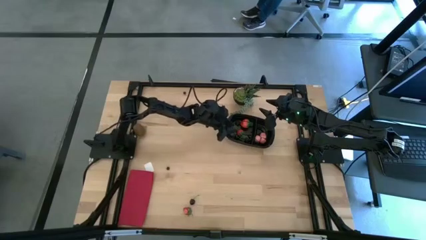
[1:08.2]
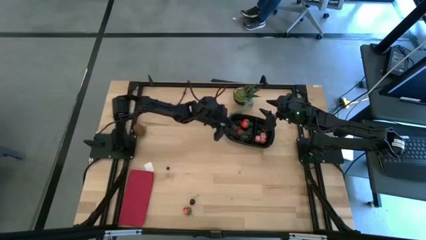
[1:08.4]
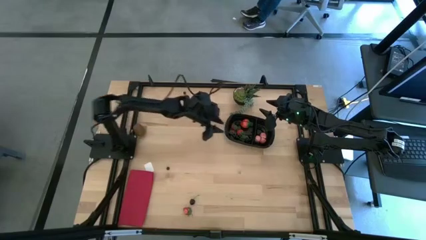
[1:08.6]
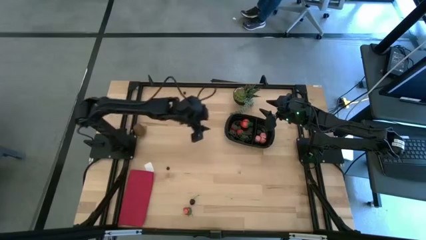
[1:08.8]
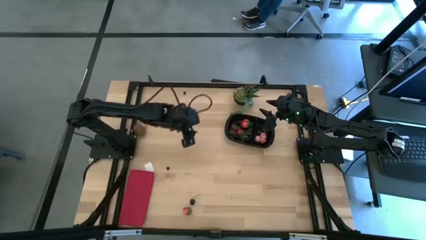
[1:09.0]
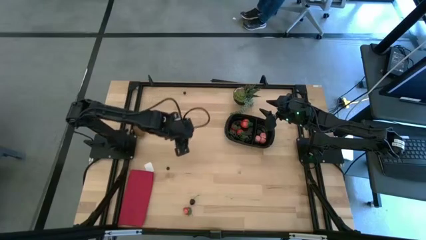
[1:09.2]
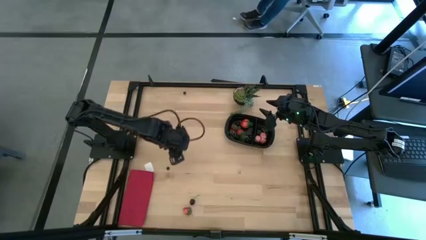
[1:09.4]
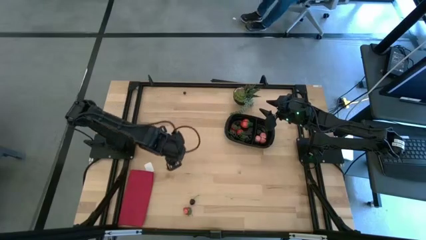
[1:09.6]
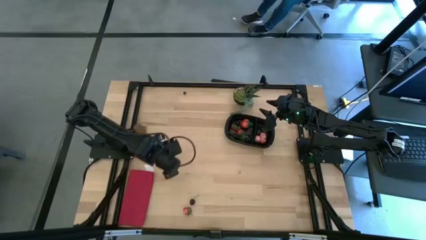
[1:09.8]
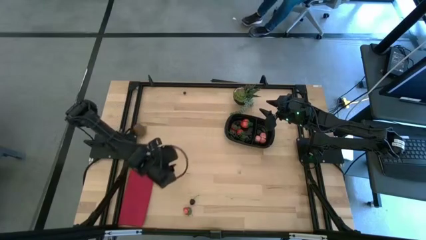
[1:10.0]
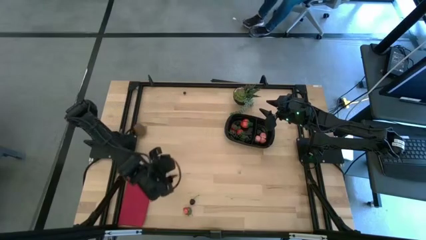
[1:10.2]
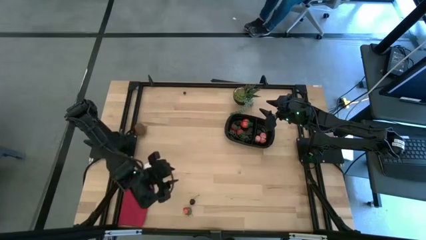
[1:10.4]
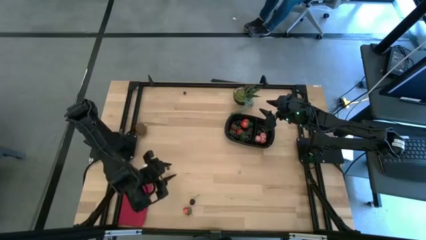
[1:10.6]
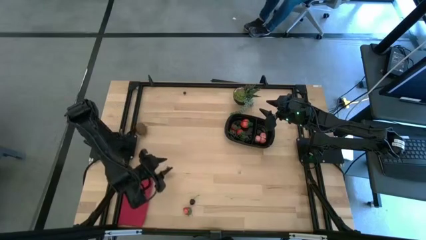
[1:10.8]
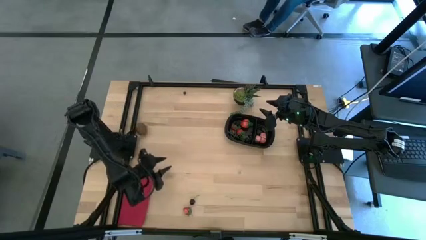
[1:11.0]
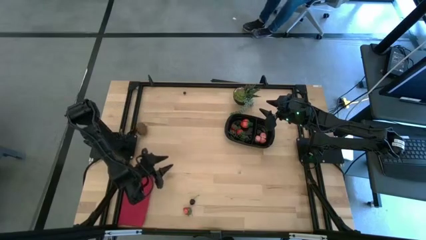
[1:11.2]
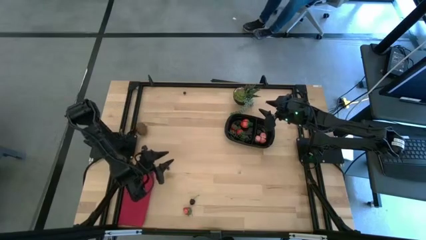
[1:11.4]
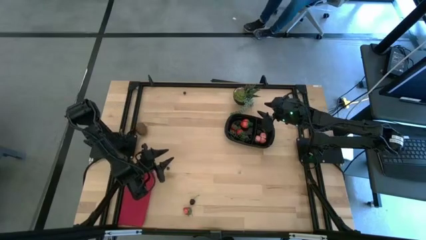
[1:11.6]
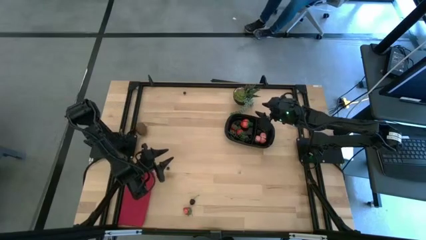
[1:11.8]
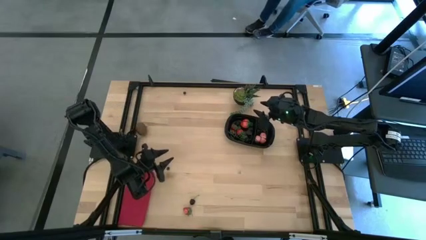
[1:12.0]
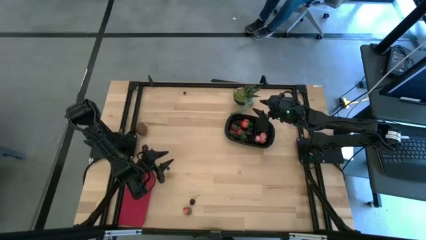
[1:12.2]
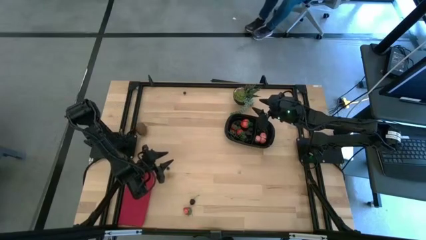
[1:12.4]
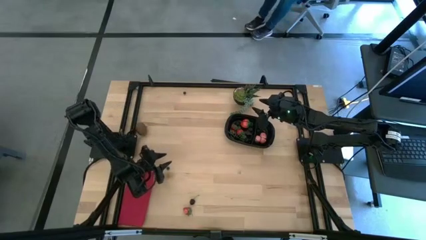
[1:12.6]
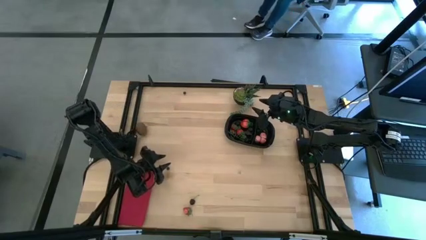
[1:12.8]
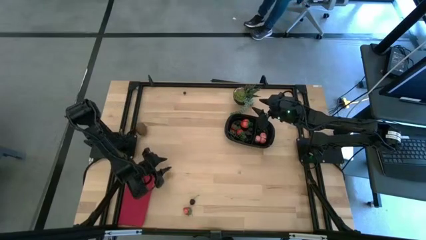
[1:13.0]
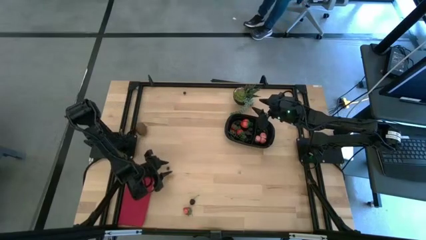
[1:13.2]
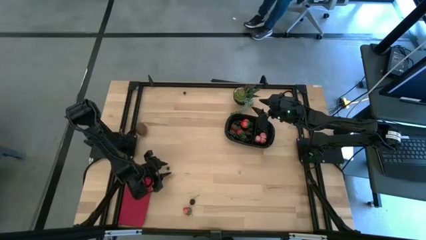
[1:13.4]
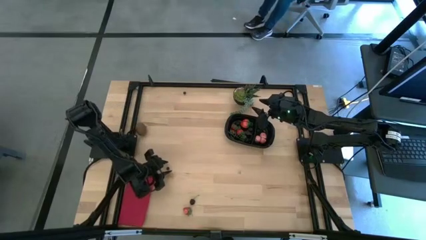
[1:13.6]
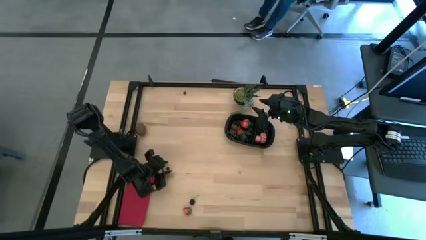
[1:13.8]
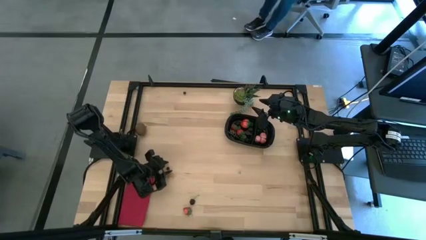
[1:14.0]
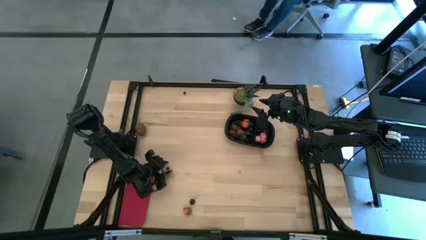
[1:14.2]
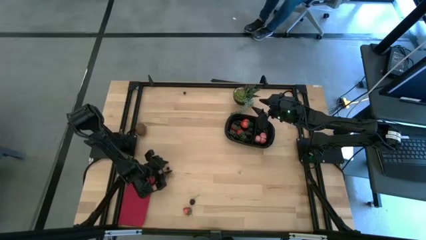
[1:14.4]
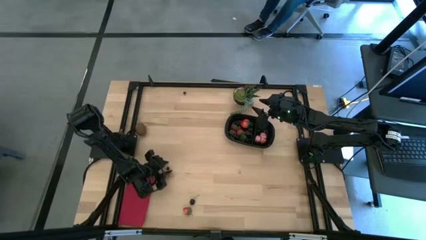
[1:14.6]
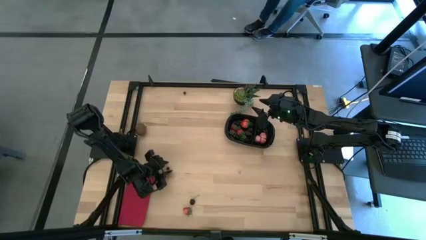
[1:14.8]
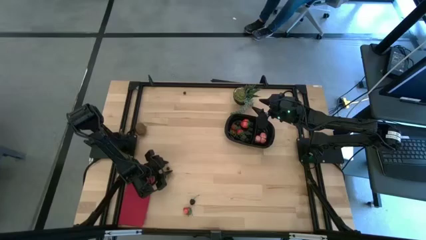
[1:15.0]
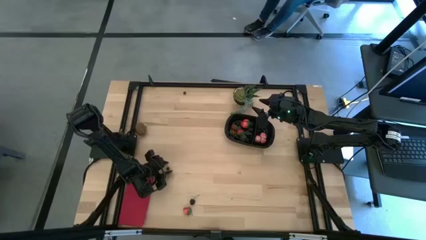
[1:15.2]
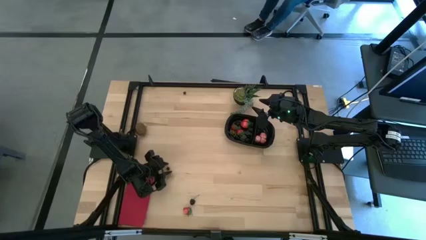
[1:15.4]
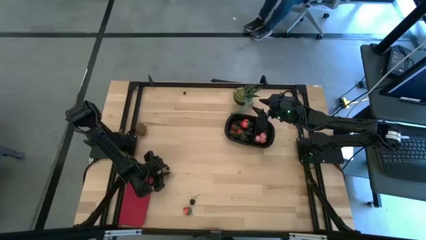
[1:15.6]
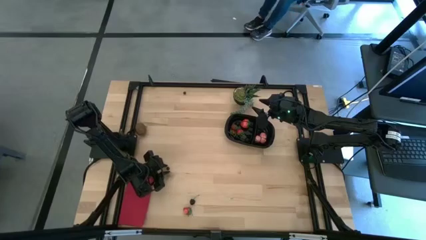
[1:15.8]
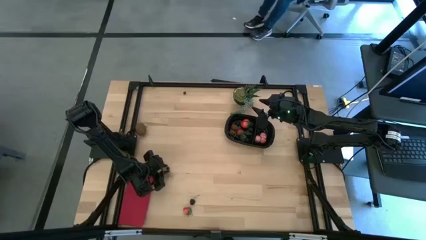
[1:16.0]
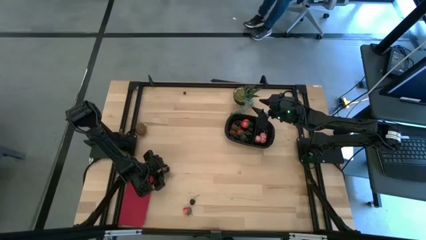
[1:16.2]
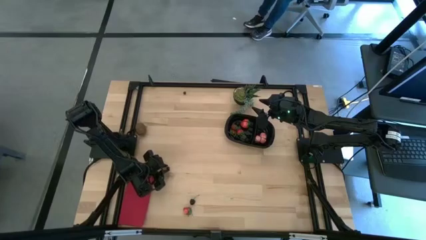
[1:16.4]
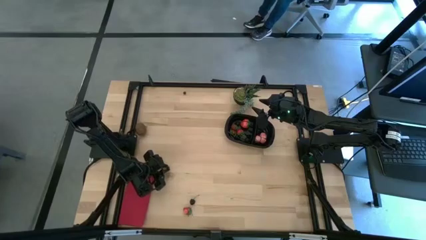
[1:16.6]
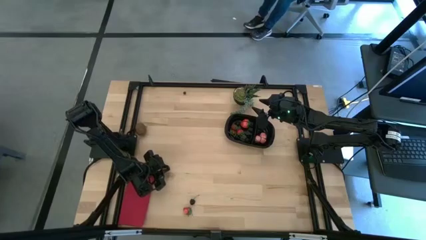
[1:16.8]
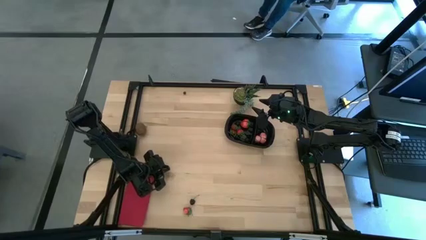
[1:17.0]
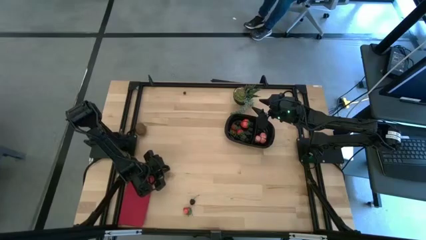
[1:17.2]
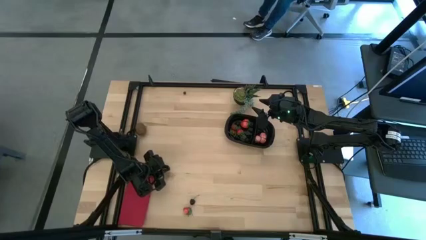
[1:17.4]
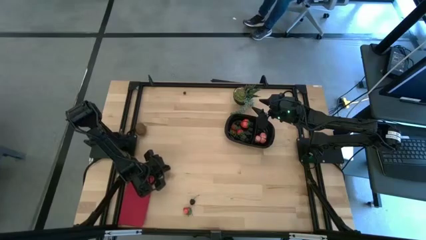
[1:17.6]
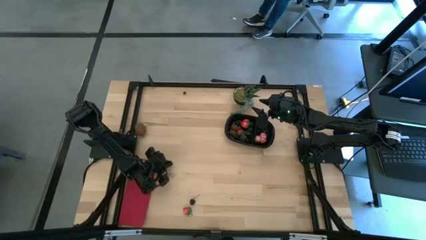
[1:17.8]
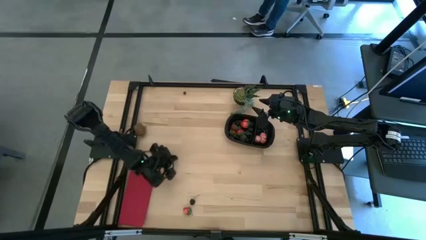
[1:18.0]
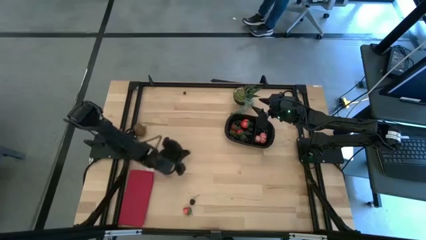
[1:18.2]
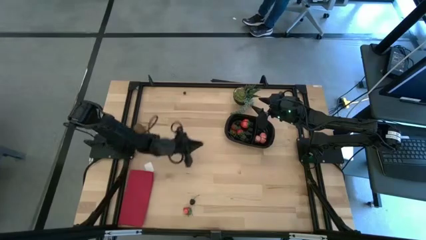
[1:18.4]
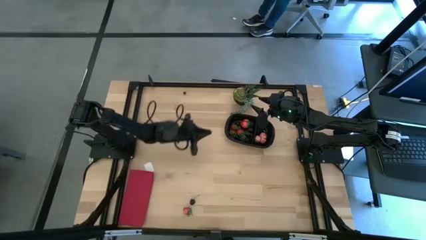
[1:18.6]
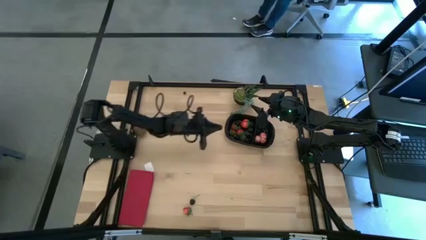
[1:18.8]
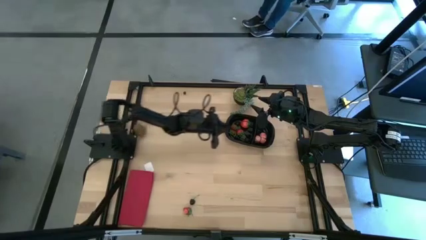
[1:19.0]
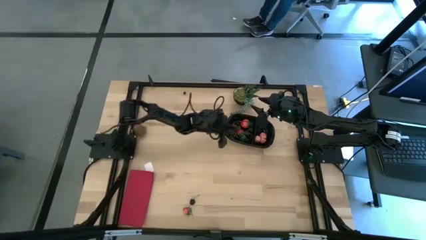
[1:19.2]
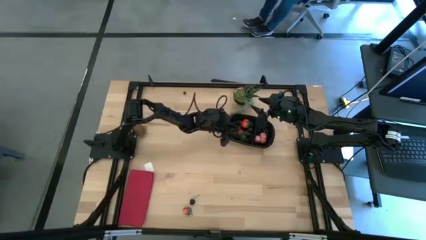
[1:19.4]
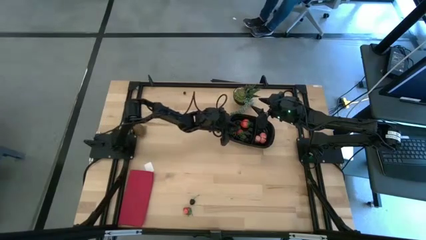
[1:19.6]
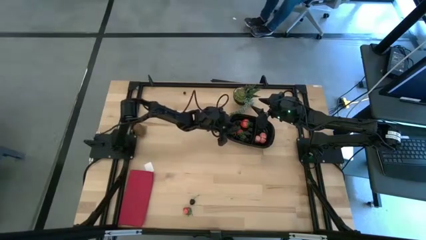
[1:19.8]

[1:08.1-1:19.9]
Task: Pick and placing Produce into tupperware
Put the blueberry into the of the black bin

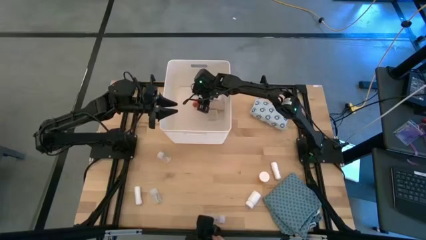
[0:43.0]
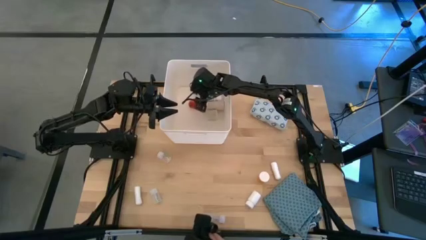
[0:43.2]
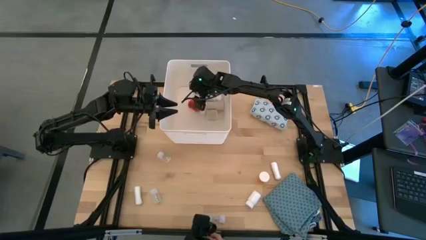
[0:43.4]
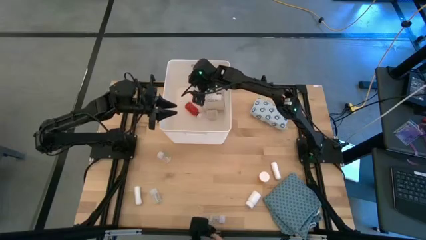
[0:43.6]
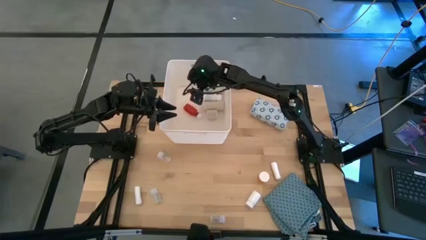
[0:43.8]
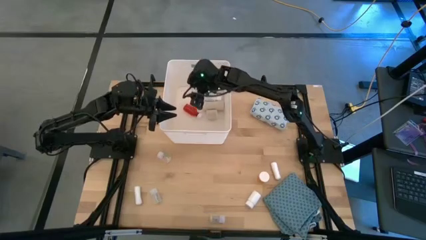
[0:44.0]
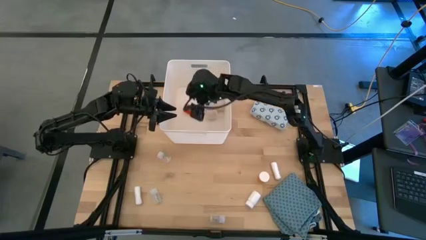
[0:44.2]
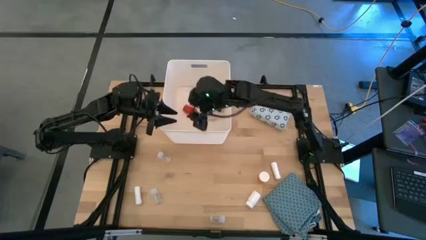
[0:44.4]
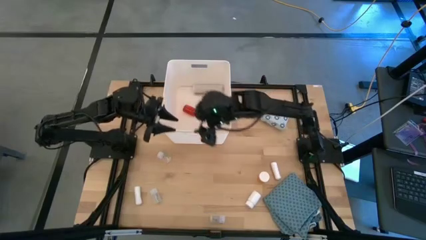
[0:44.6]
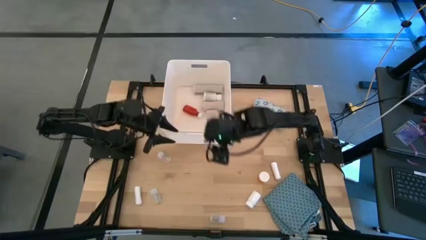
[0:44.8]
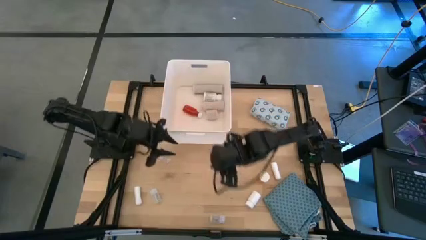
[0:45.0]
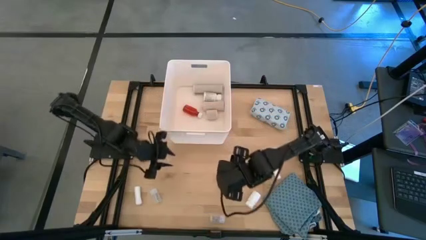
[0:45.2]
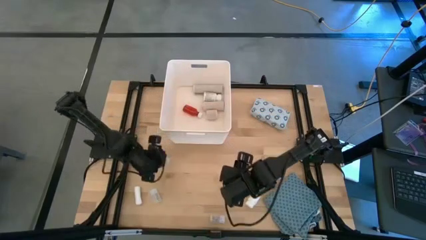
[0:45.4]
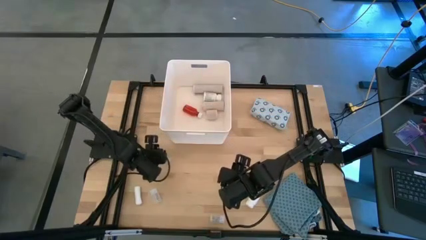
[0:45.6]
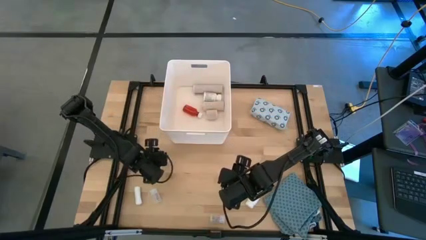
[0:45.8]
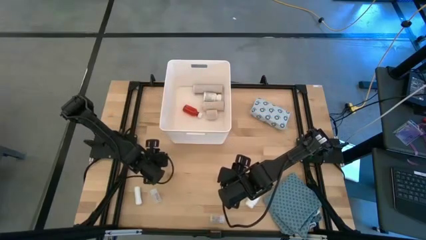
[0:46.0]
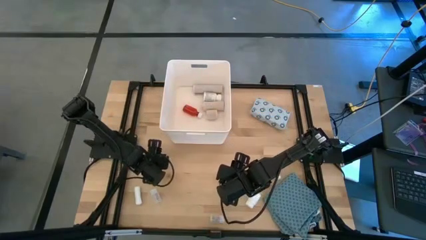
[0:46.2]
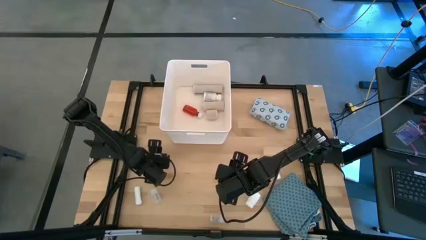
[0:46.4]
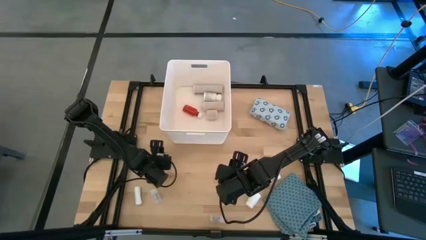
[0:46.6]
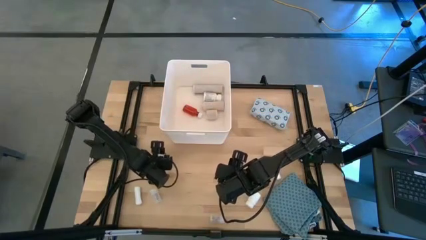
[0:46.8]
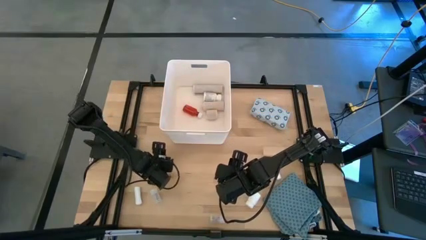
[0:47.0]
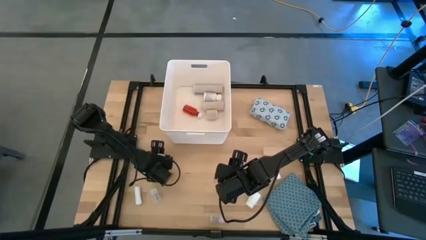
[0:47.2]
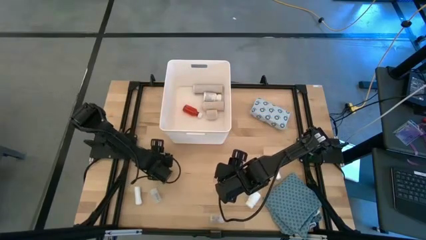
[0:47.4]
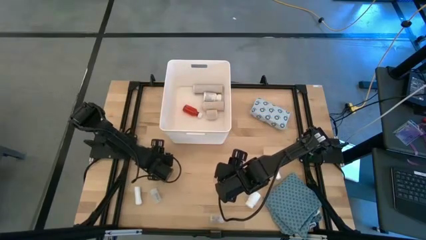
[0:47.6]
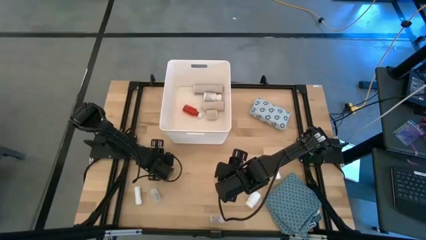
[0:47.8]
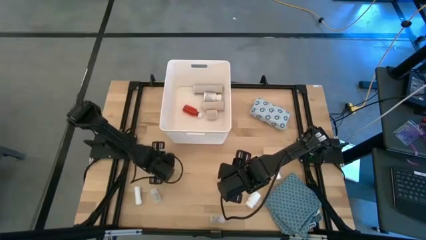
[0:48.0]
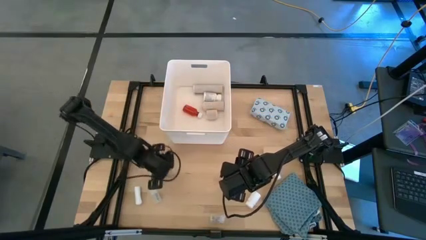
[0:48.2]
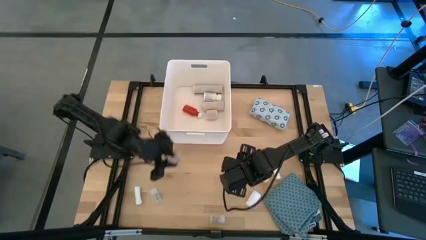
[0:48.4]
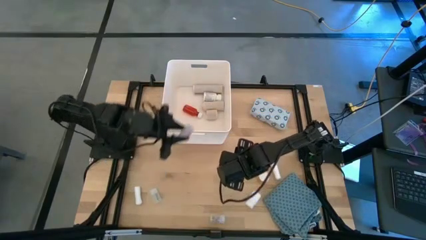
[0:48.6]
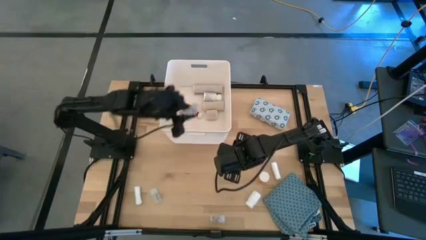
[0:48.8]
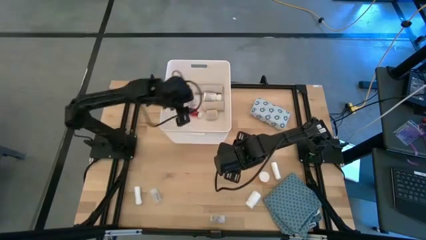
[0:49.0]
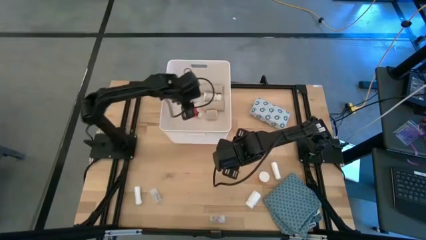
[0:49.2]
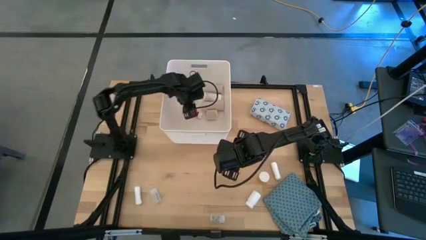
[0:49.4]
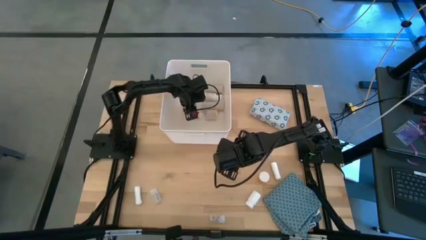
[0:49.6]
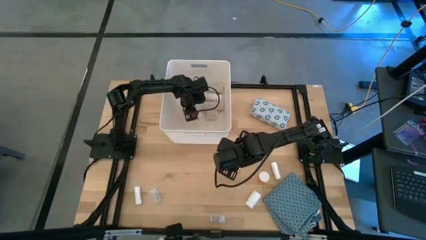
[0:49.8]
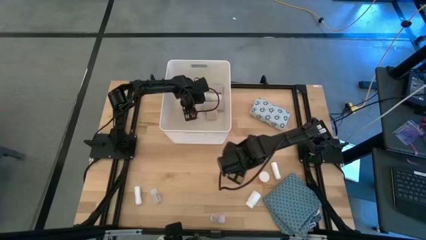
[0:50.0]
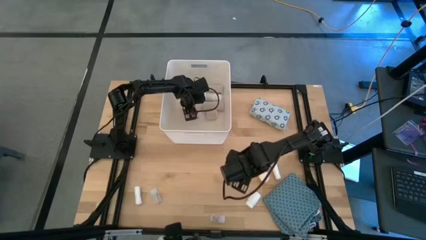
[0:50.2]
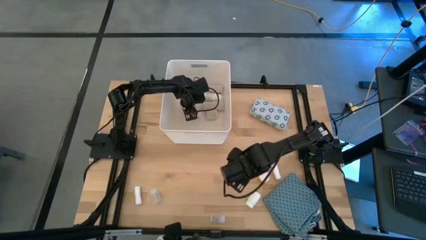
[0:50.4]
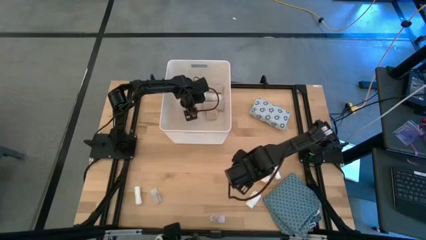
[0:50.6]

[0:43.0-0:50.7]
Task: Pick & place medical supplies in basket/bin
Put the top transparent pill bottle into the white bin
